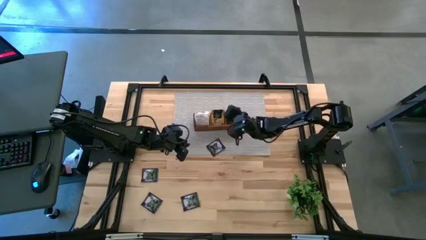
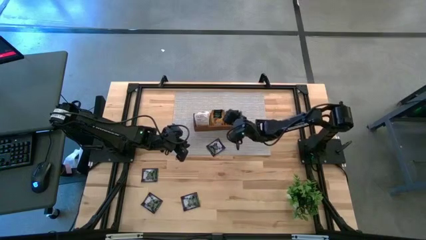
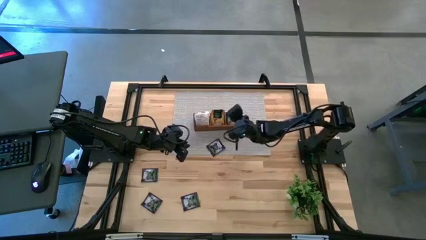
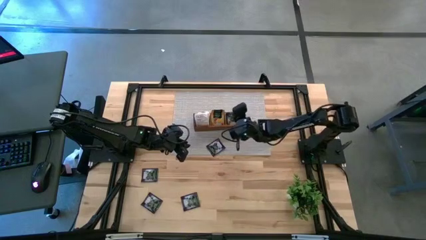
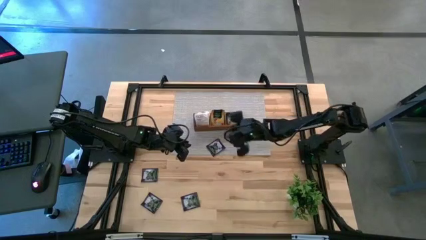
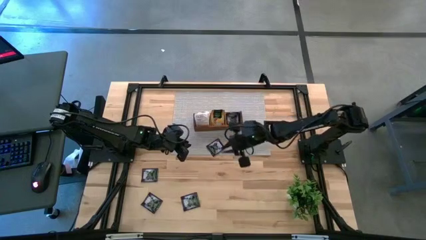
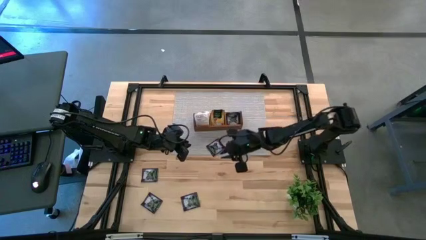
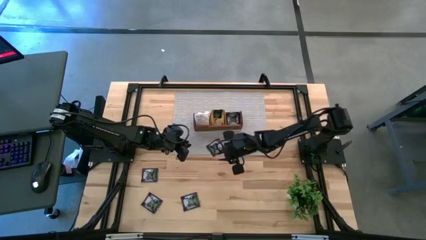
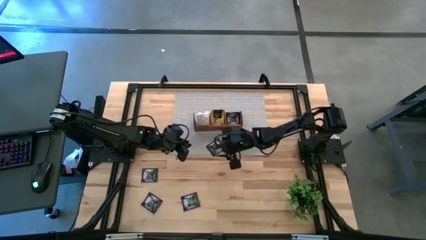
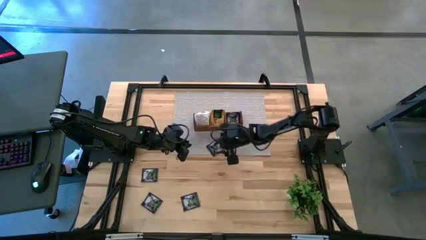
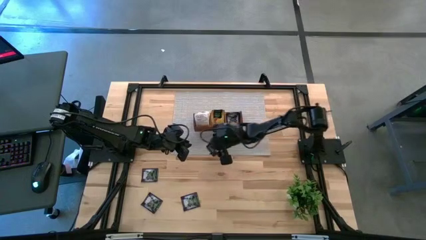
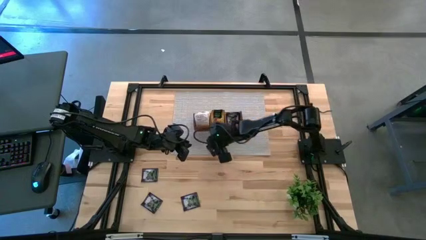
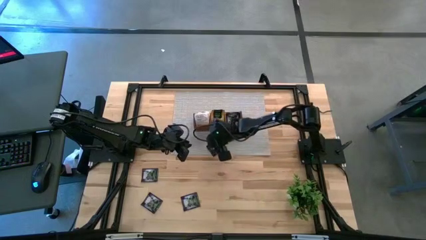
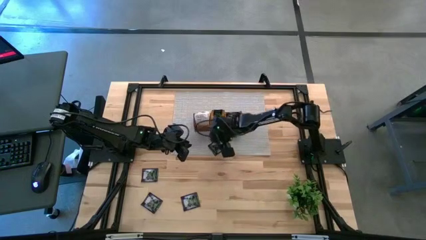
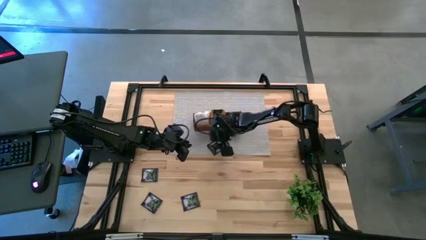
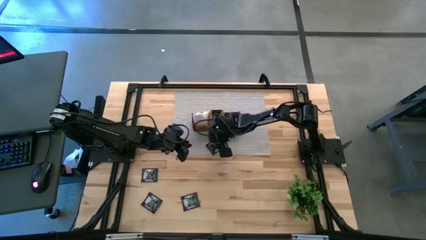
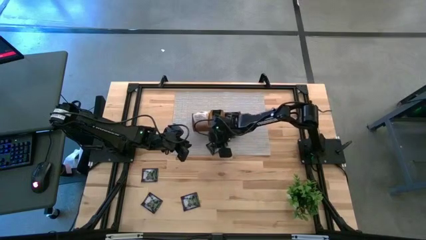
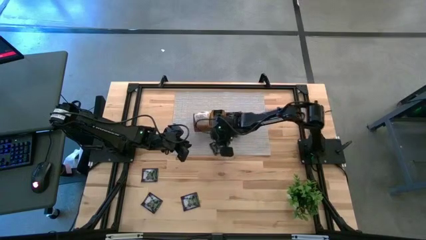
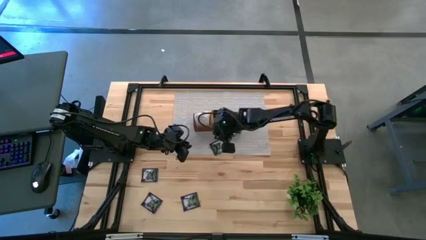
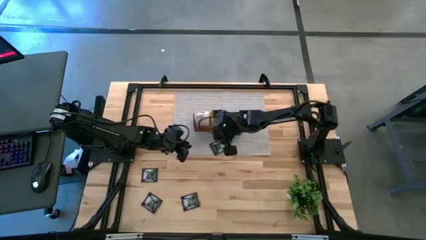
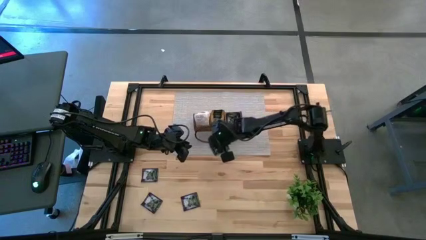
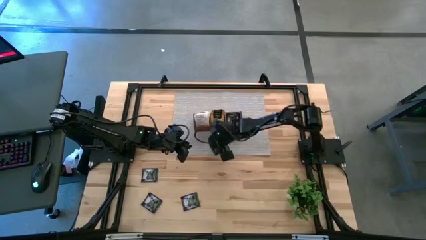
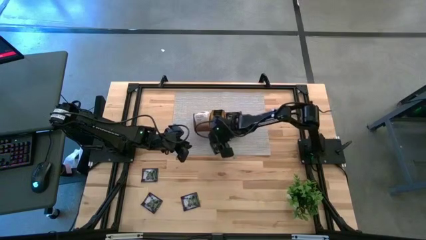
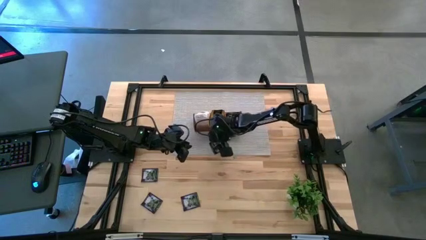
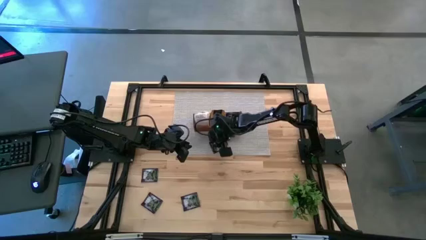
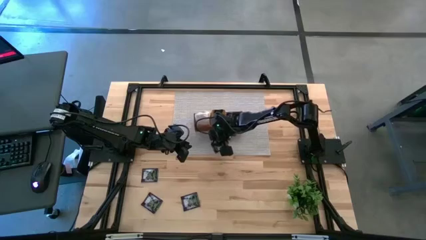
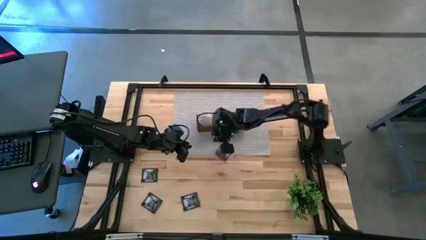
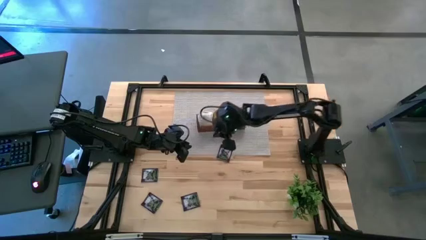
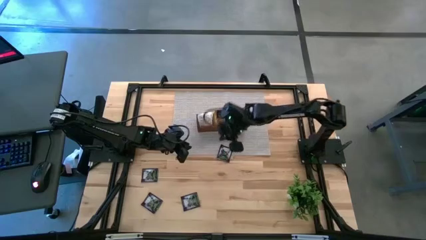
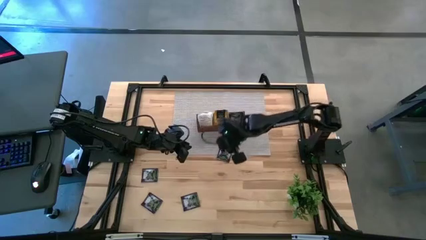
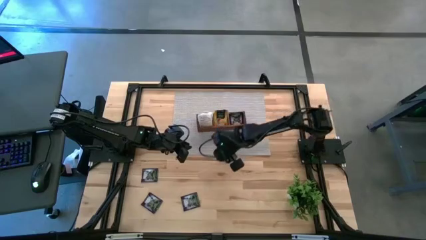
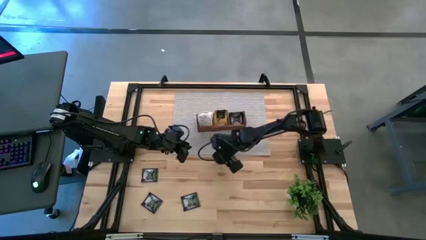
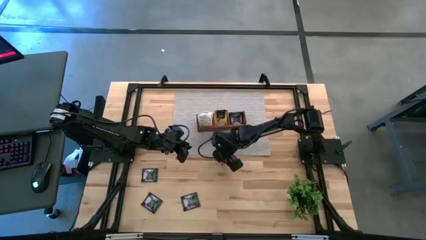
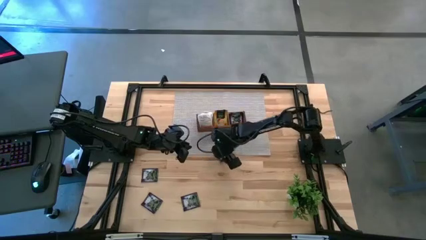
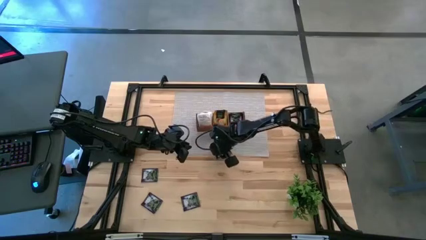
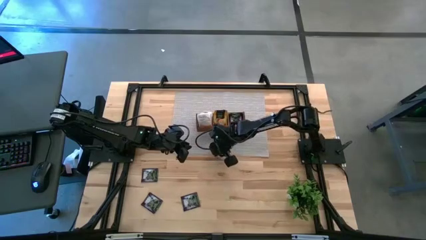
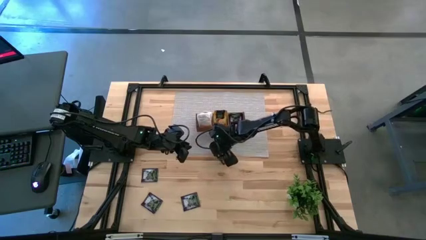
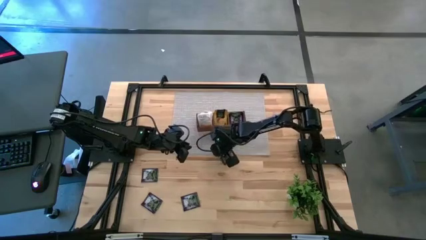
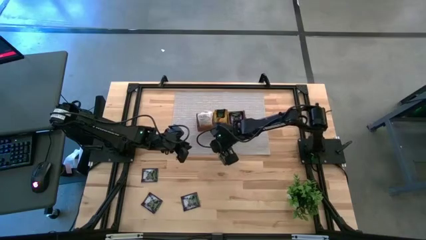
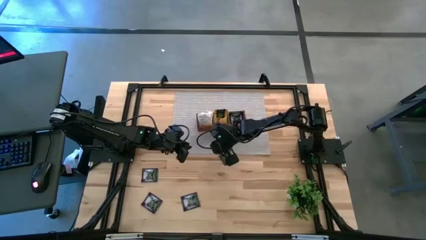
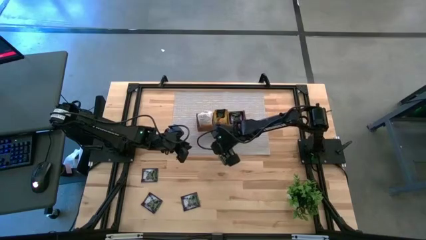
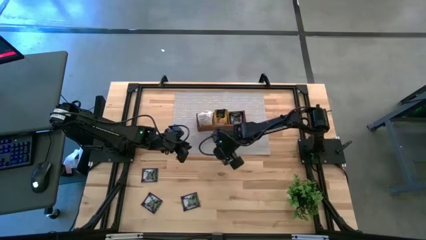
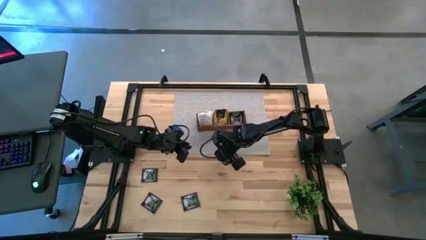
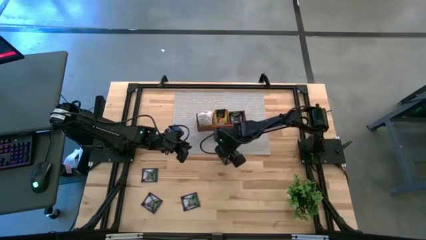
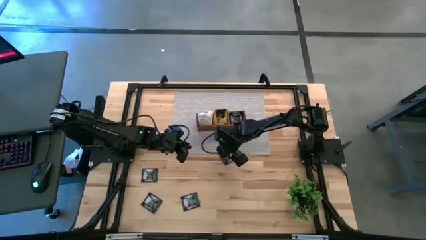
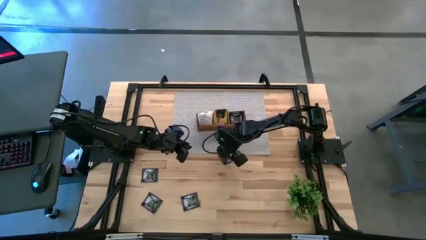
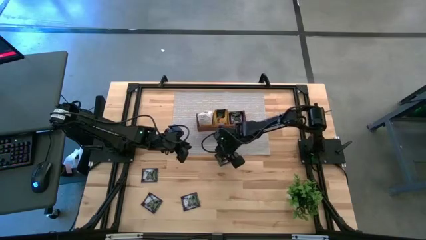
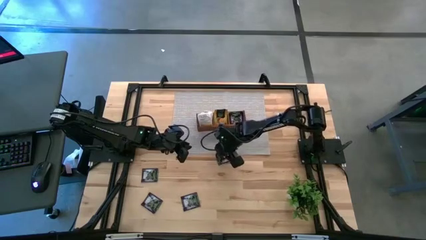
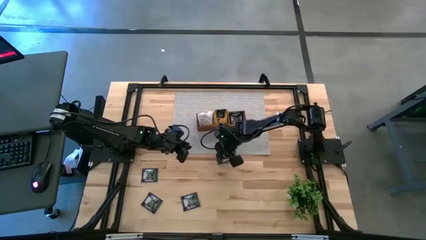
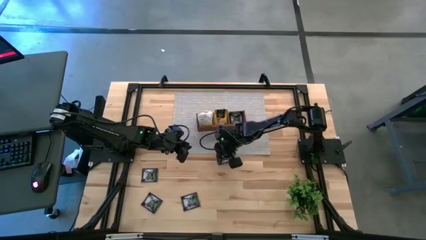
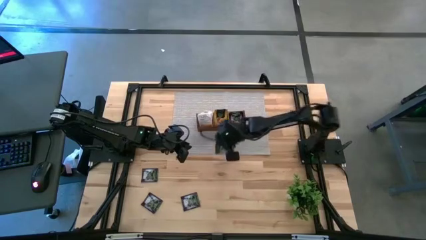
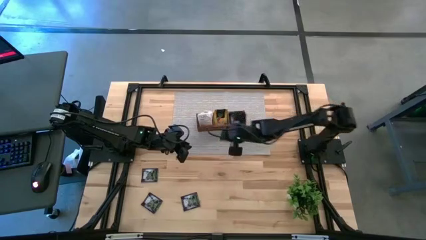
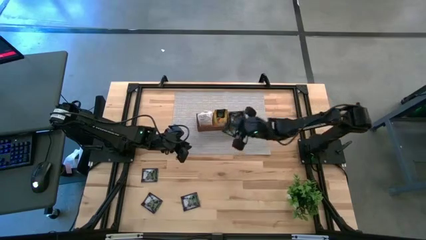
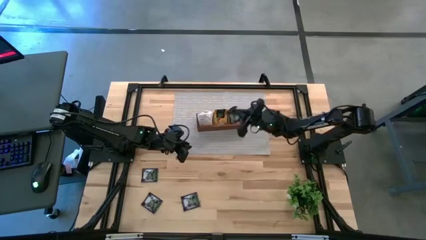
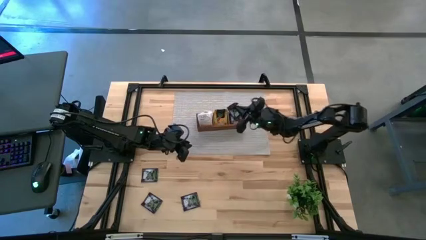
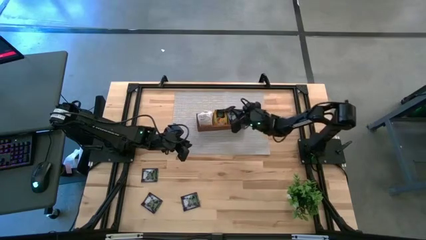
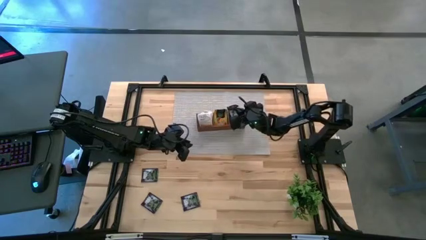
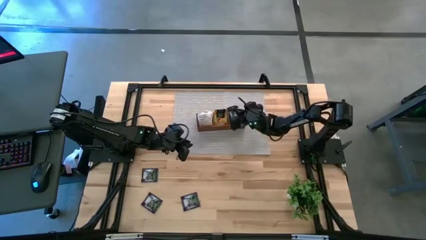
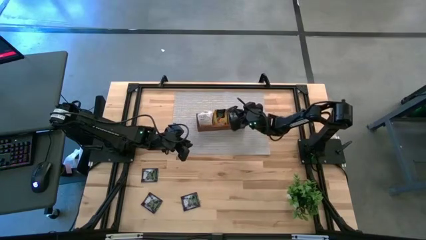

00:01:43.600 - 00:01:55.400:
Task: Pick & Place Tea
Put the violet tea bag into the right section of the wooden organizer

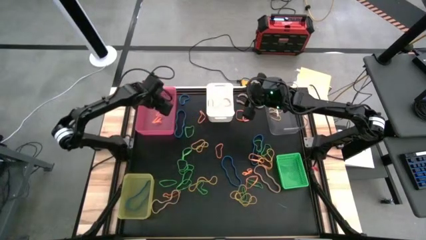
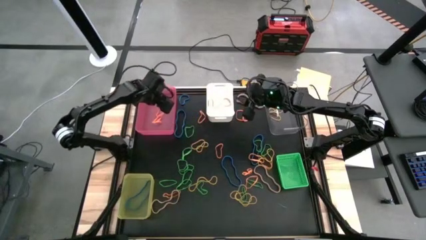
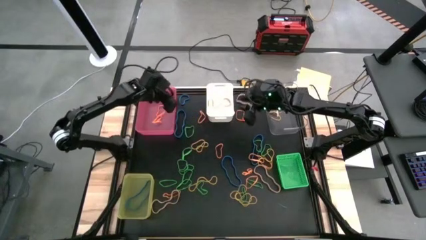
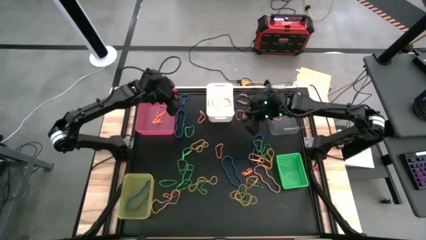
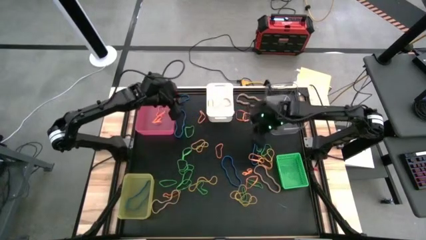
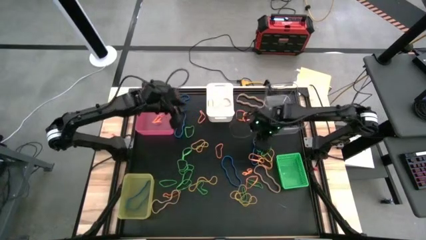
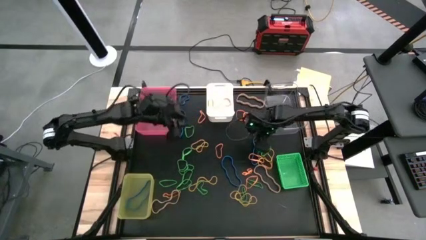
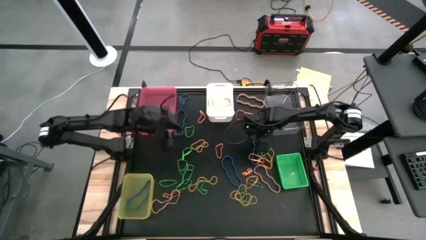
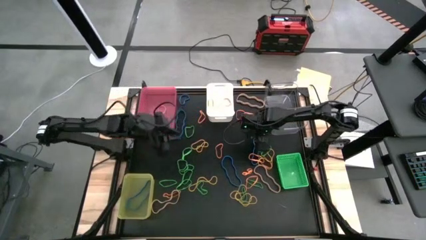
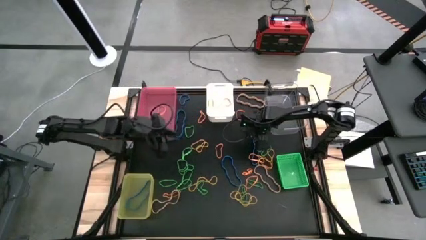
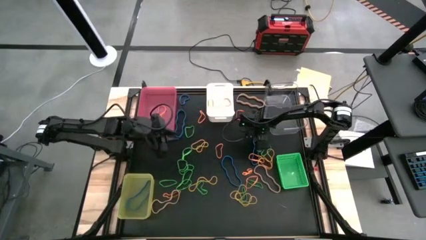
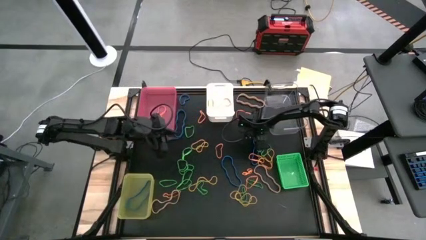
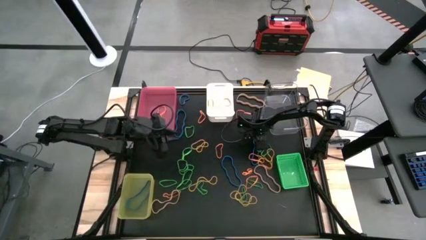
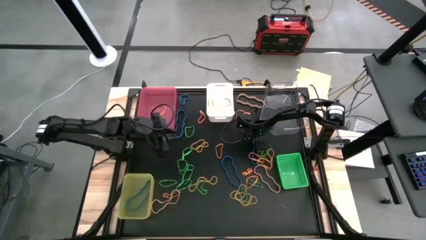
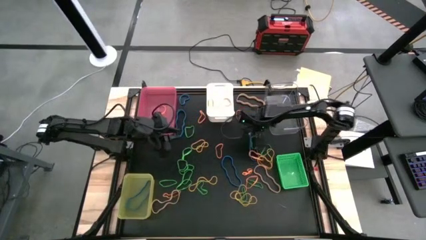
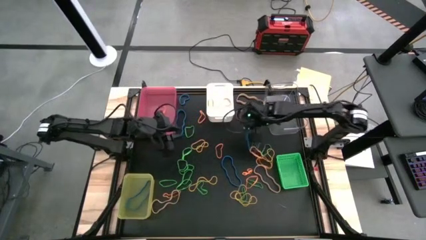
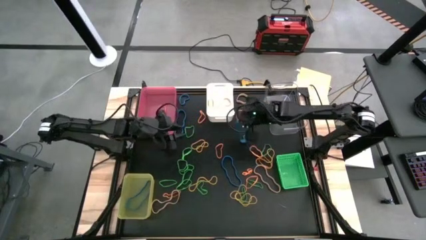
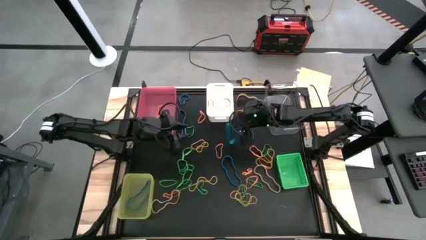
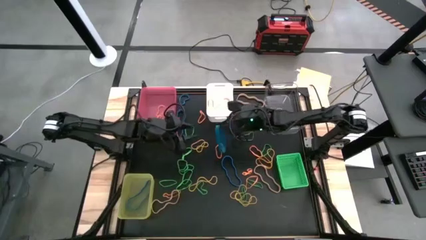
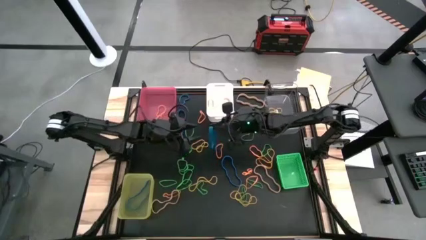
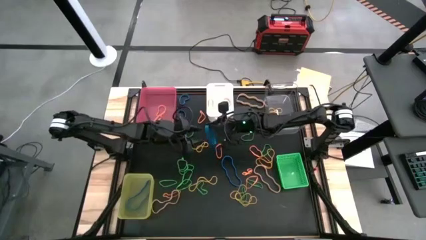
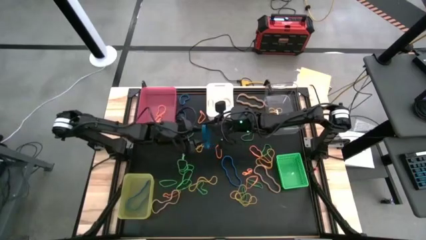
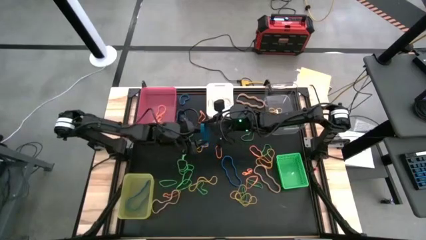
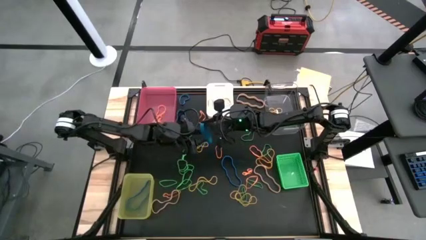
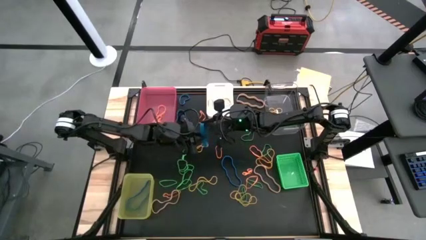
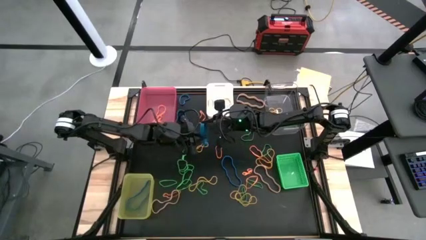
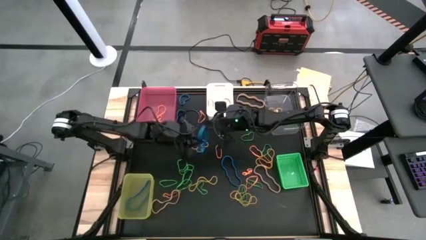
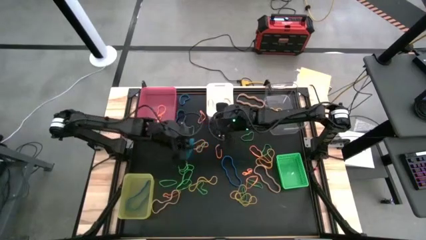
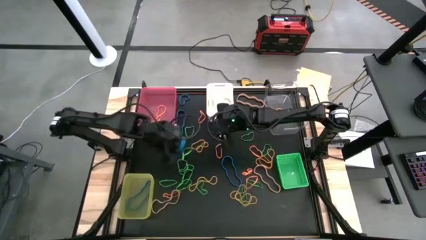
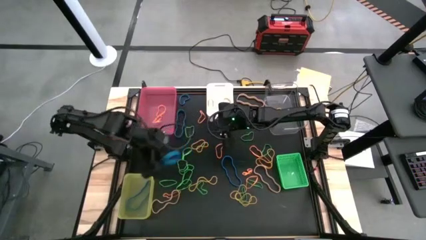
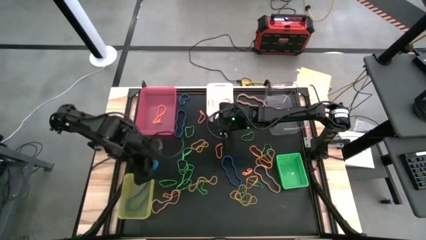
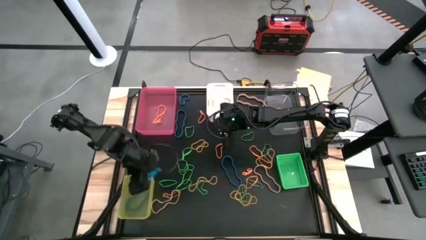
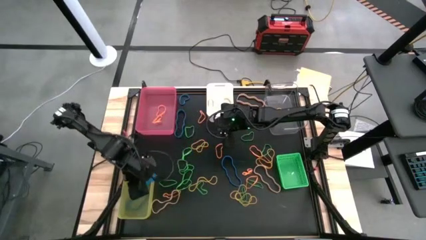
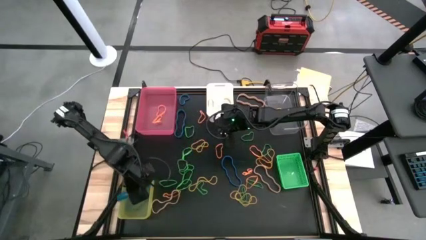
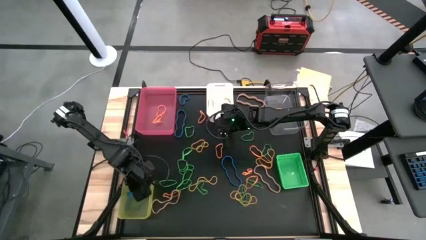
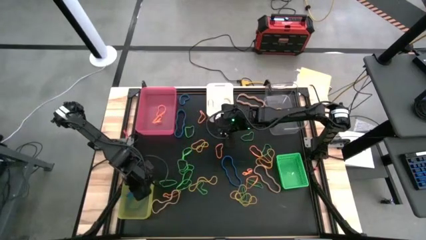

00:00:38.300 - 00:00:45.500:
Task: Sort rubber bands into baskets
Put the blue rubber band into the yellow bin
